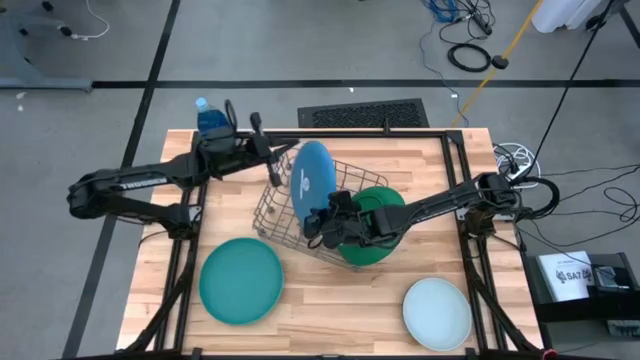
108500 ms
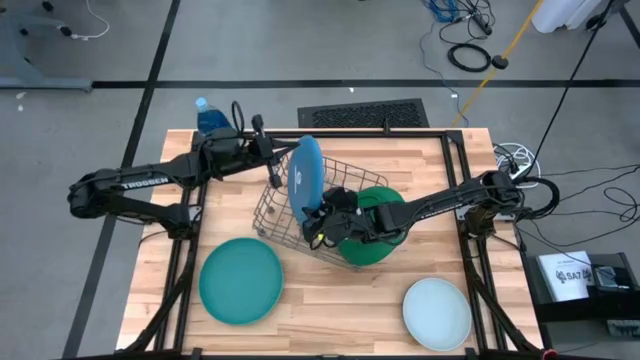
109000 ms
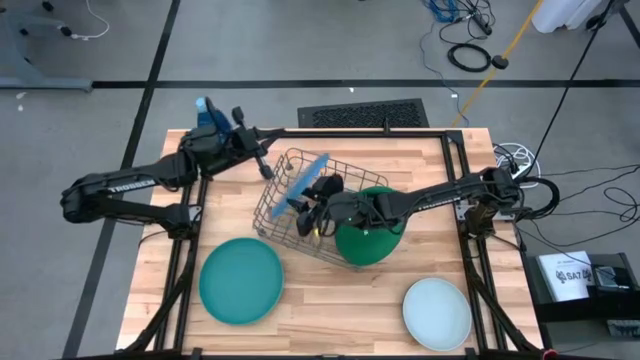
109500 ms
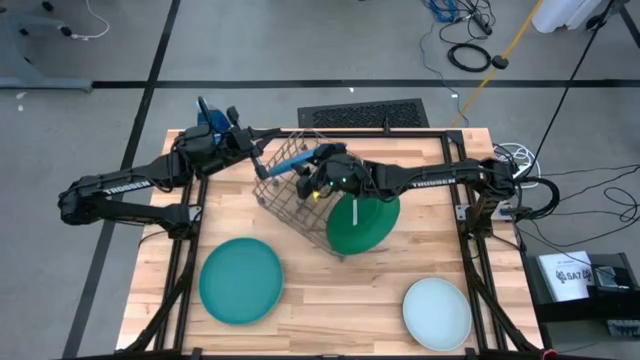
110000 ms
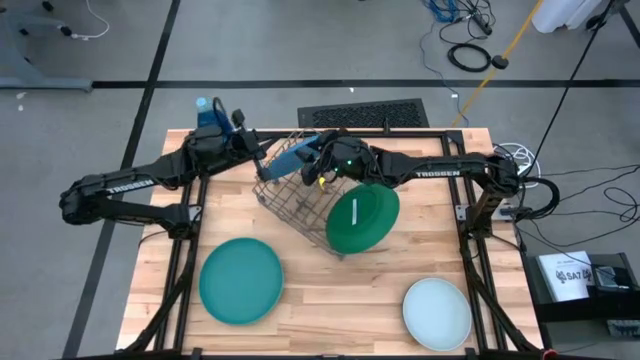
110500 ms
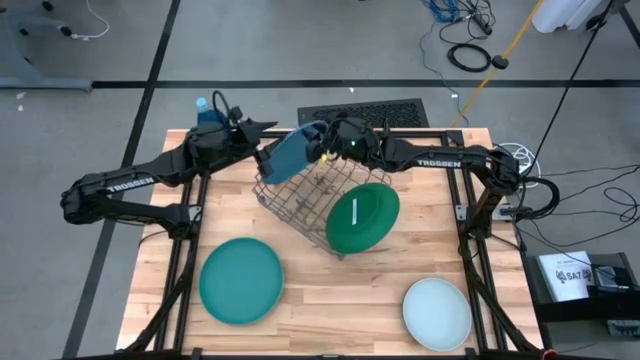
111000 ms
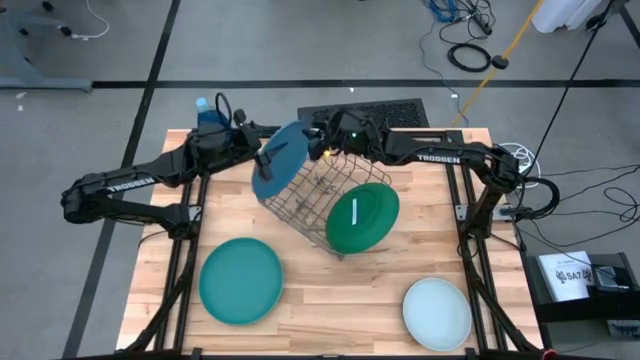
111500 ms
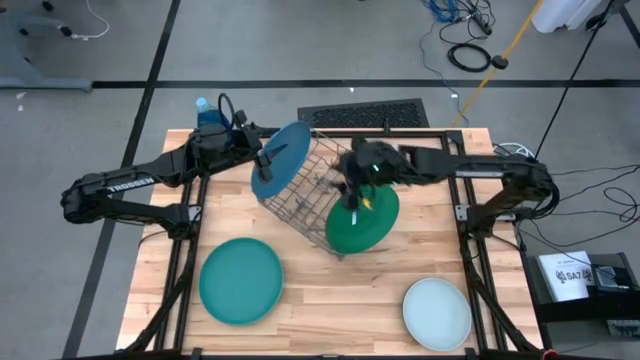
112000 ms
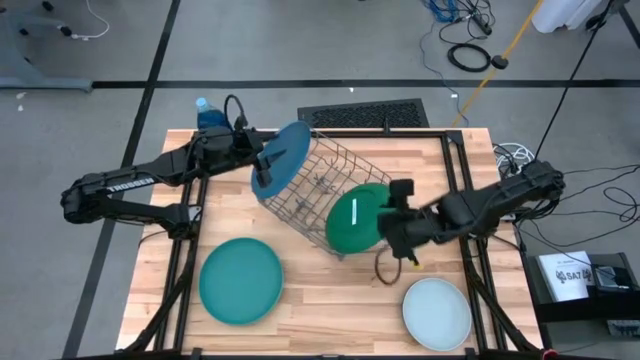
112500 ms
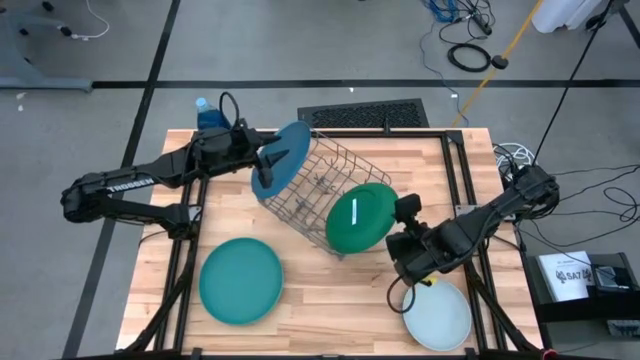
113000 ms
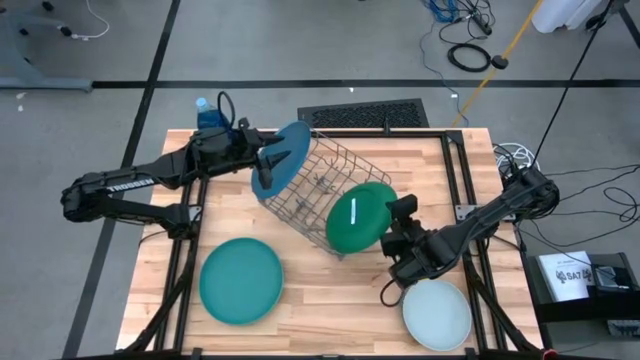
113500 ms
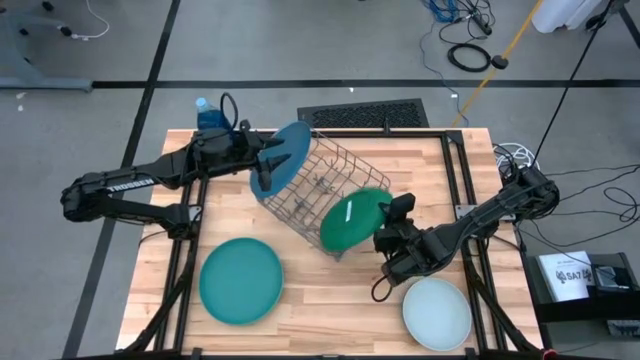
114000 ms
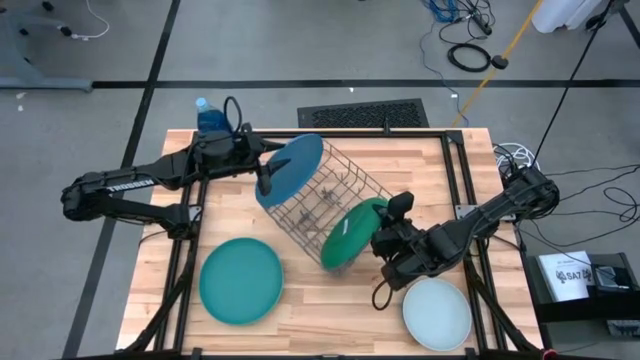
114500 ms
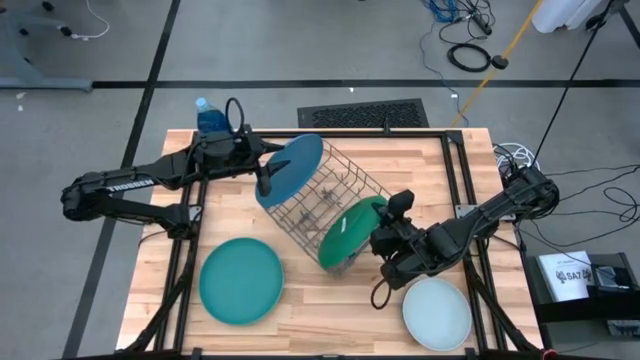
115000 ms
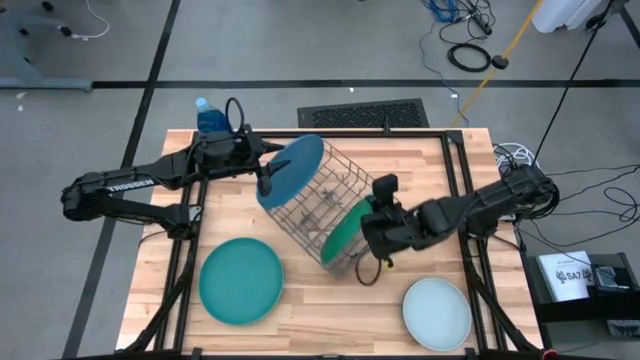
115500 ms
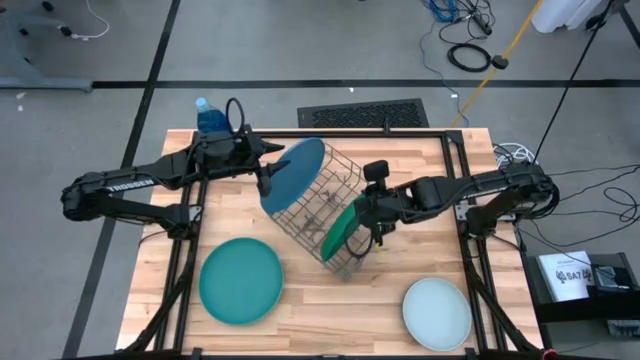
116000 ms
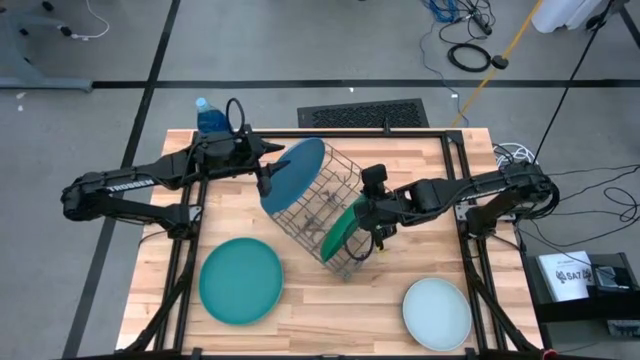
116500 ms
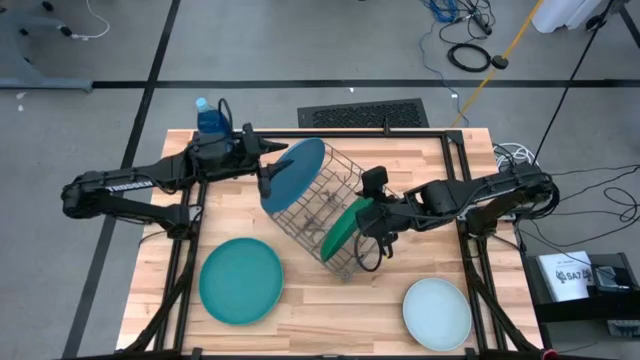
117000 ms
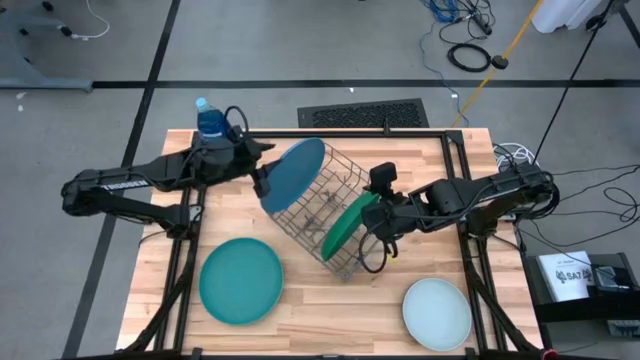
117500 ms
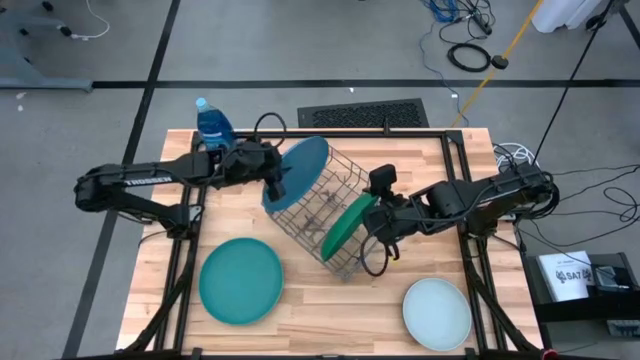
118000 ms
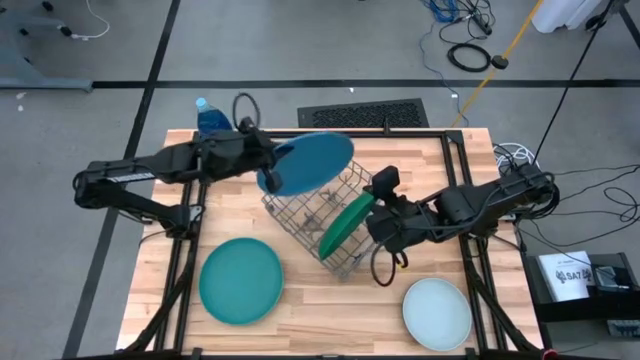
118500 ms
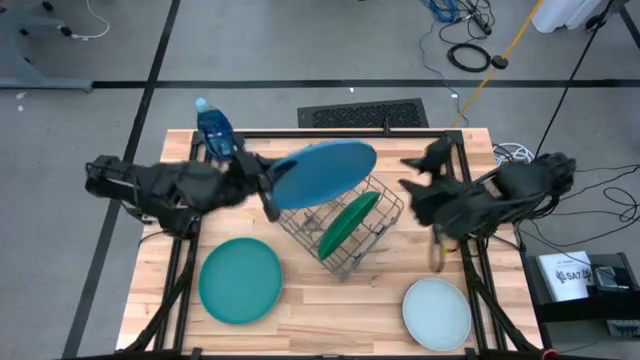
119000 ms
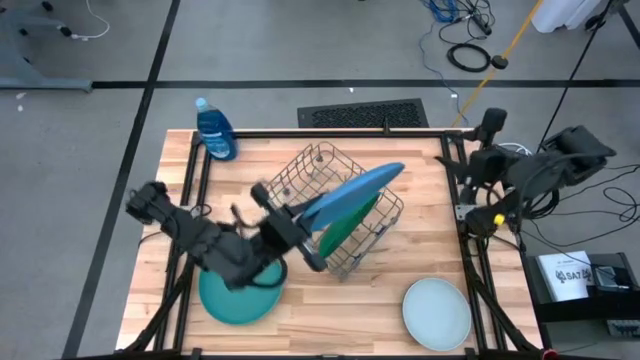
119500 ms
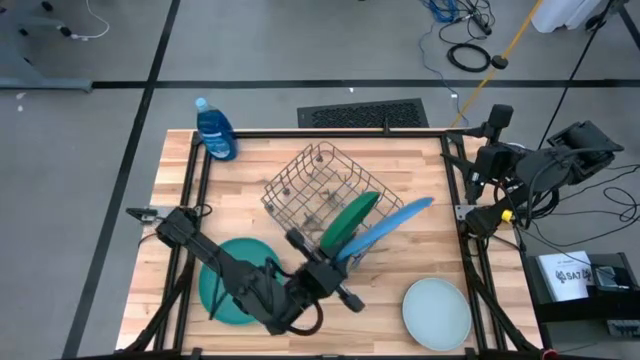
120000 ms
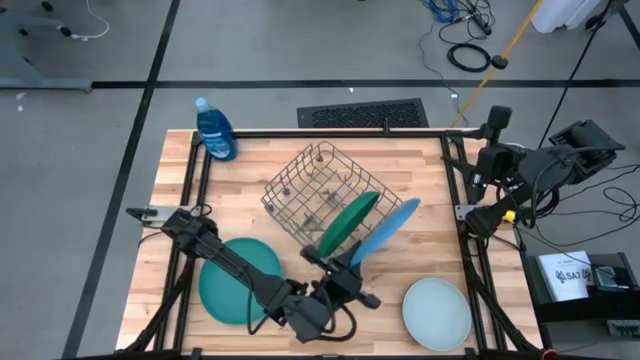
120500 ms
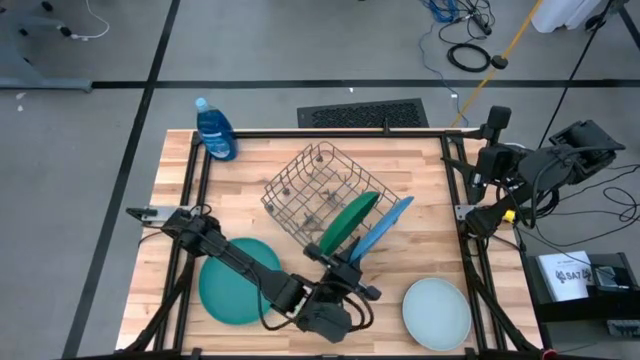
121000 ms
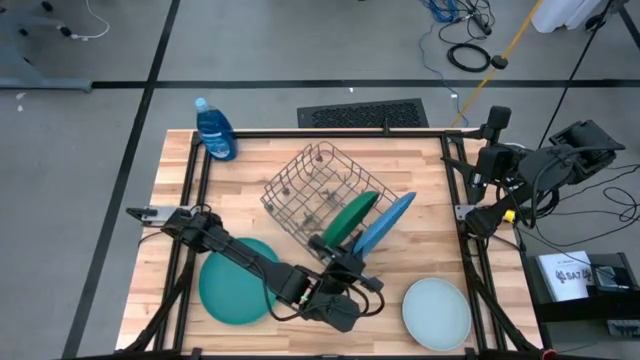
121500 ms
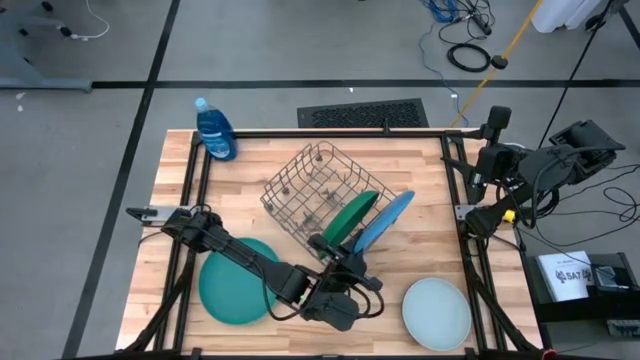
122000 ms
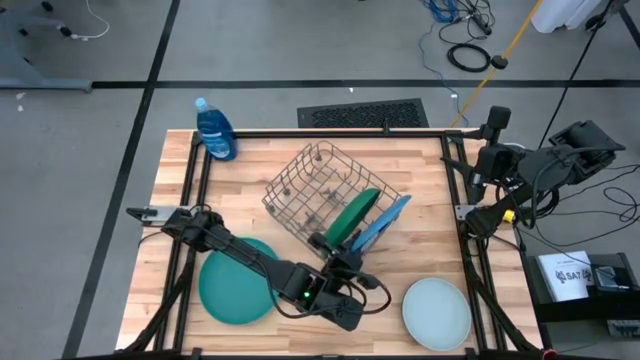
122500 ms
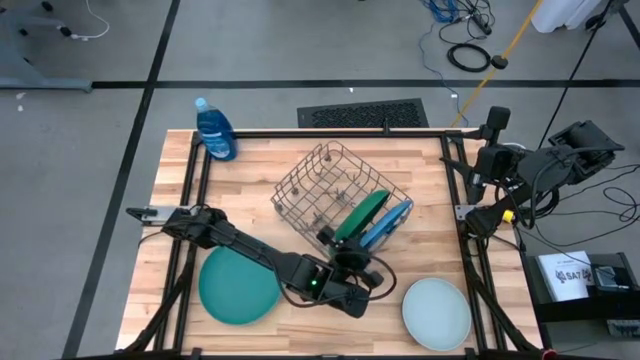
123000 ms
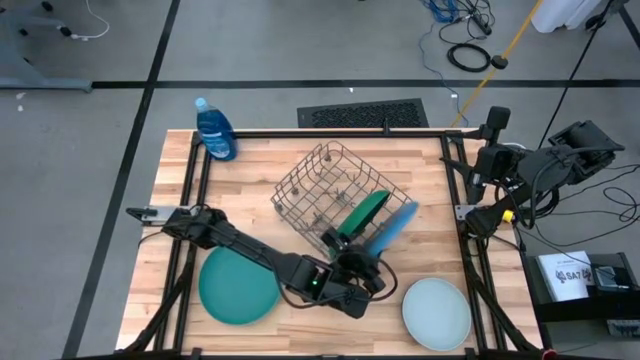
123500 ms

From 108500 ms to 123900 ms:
Task: Sort dishes
Adjust the plates in the dish rack

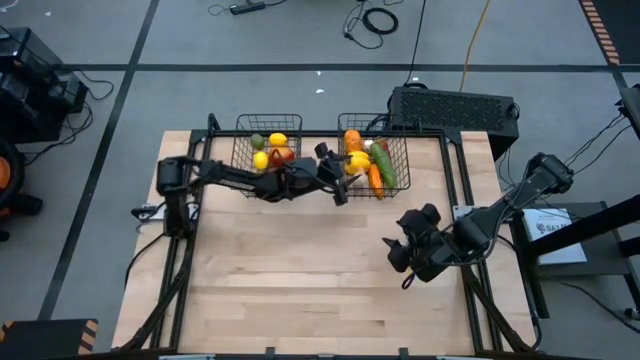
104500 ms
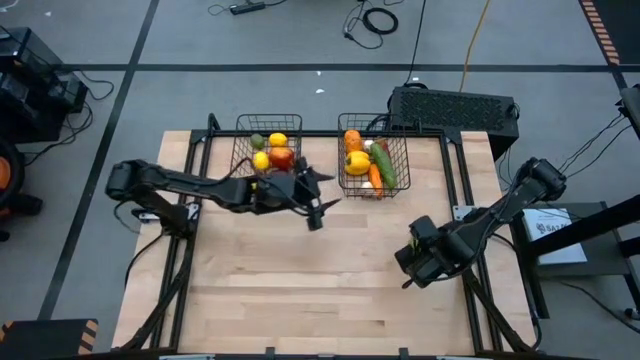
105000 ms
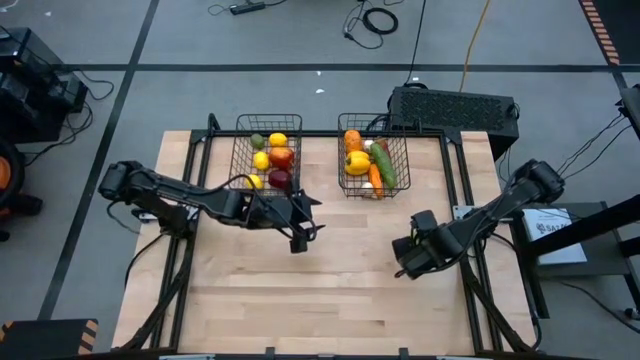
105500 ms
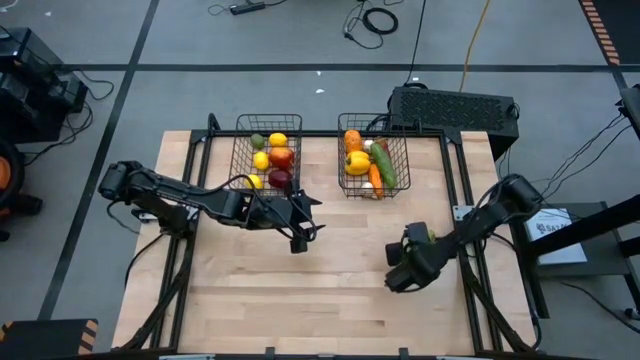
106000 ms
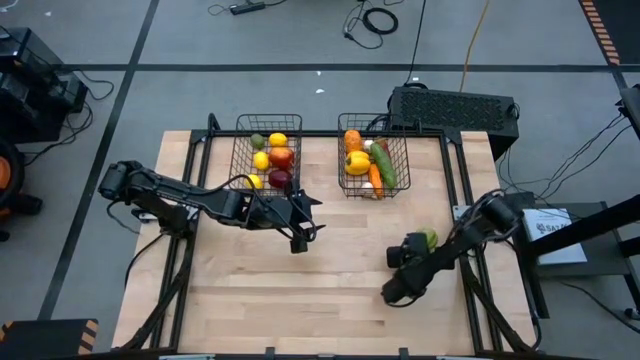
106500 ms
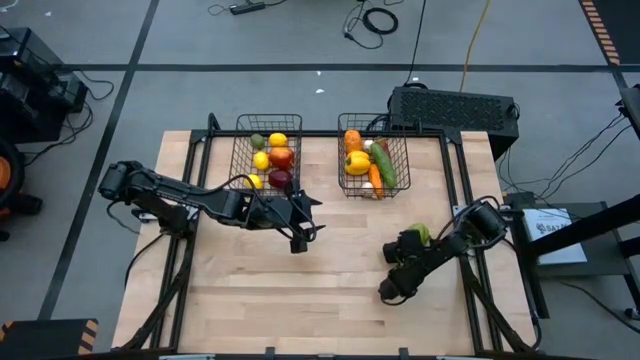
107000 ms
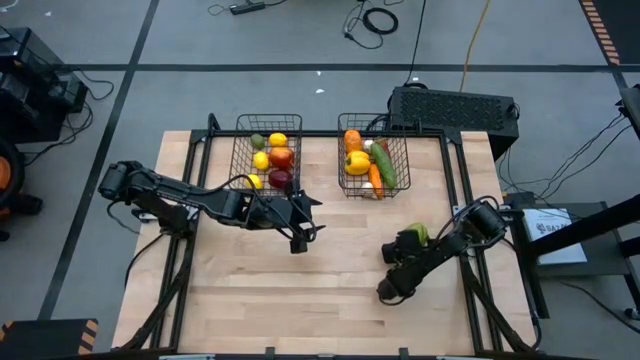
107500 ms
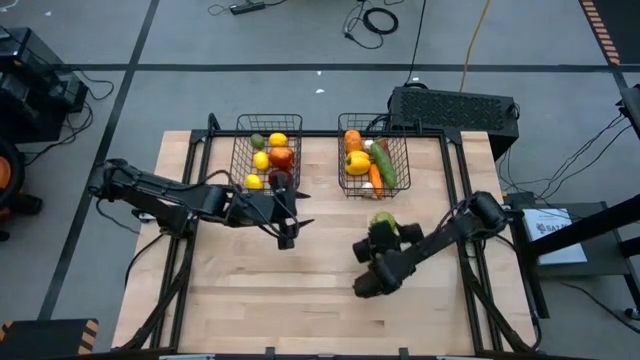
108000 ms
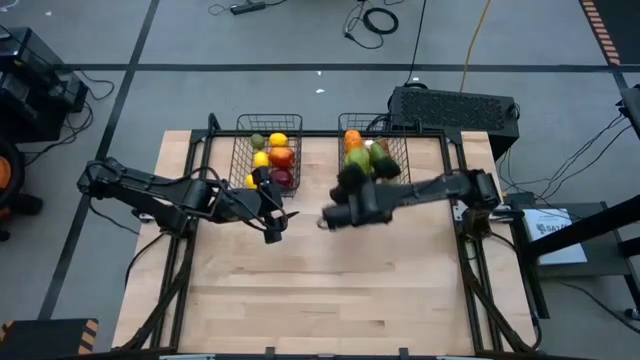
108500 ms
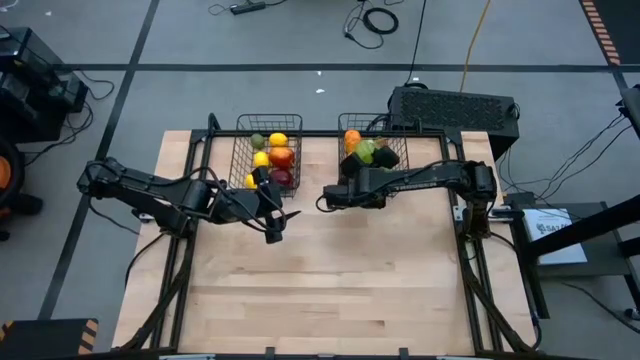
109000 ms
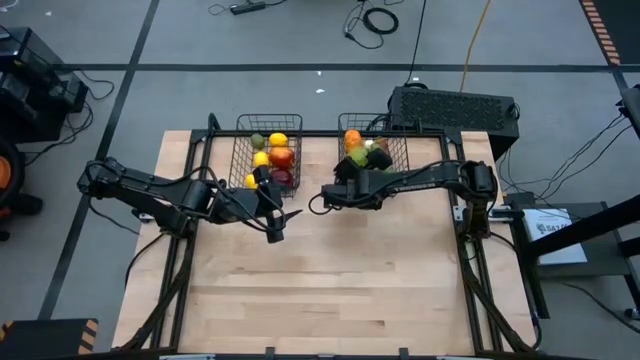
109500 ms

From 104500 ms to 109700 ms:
Task: Sort produce into baskets
Put the green chayote into the right mesh basket
